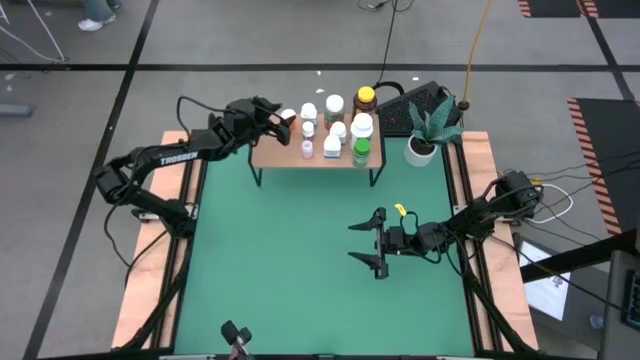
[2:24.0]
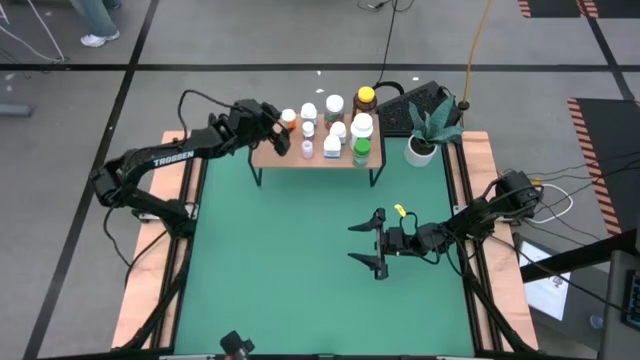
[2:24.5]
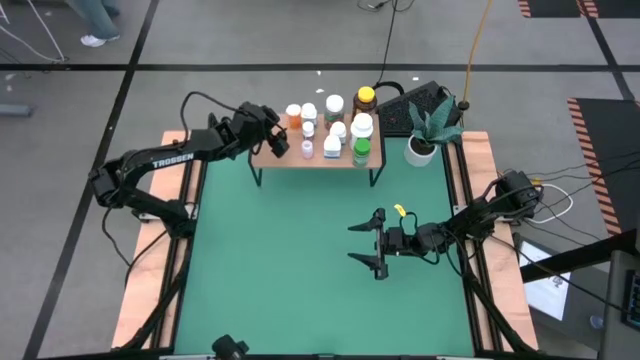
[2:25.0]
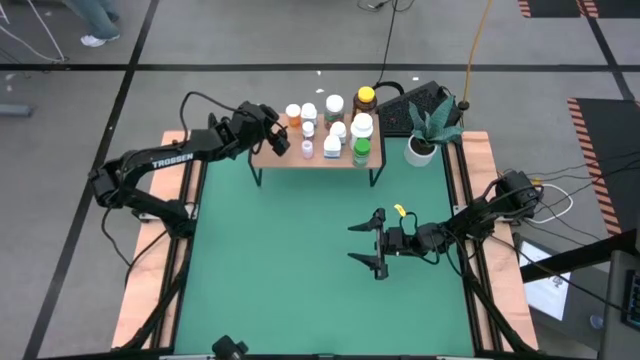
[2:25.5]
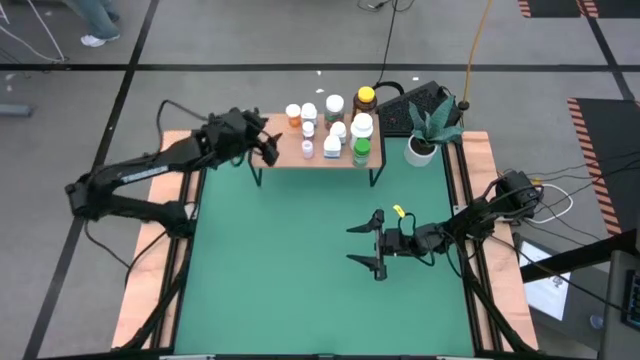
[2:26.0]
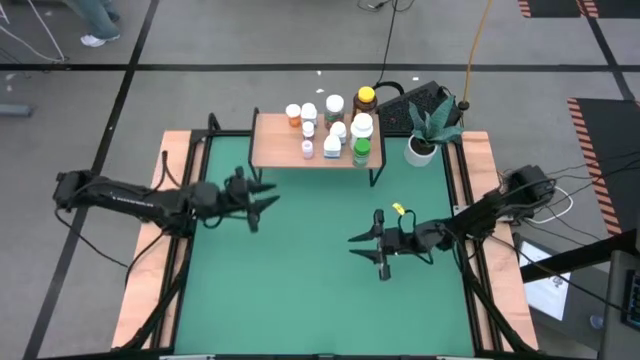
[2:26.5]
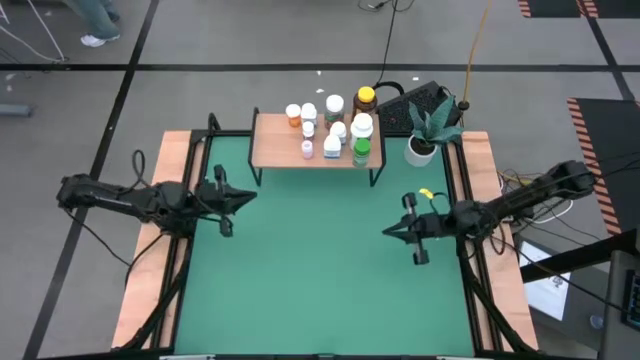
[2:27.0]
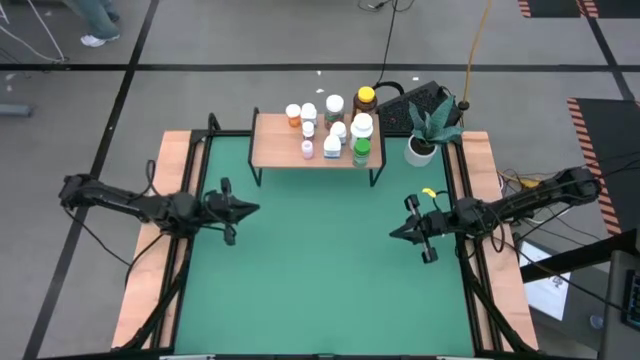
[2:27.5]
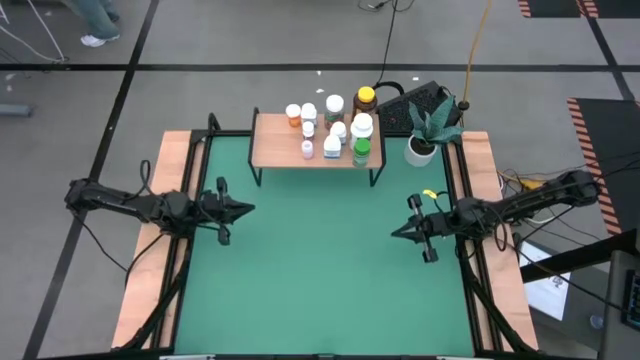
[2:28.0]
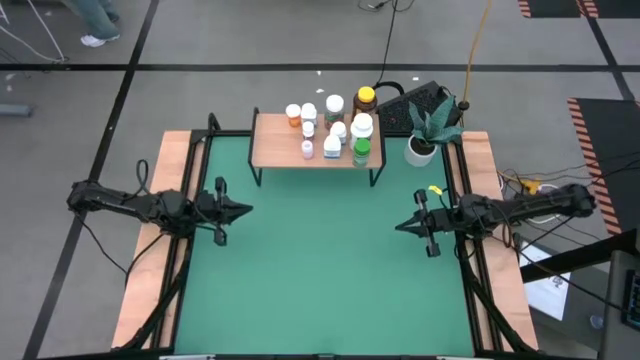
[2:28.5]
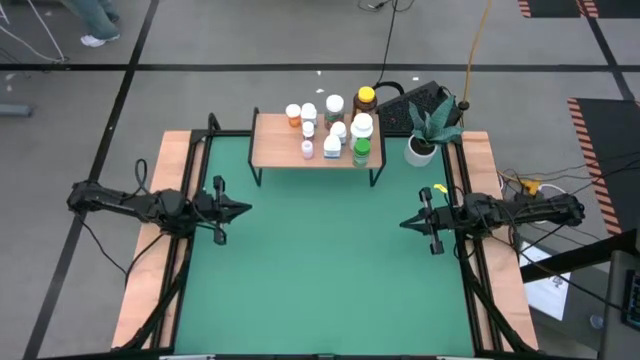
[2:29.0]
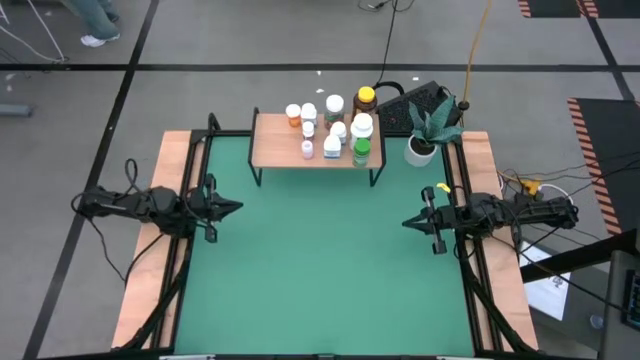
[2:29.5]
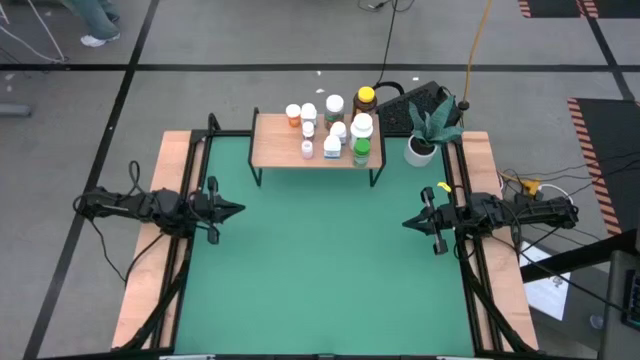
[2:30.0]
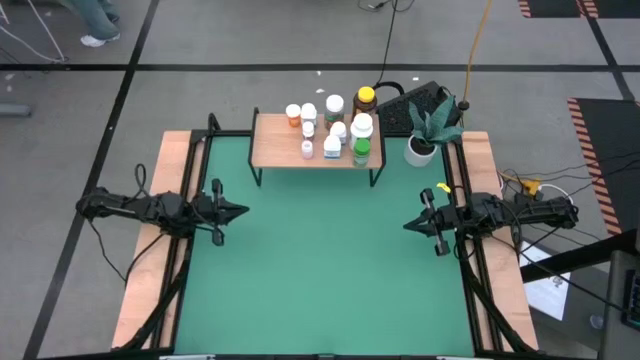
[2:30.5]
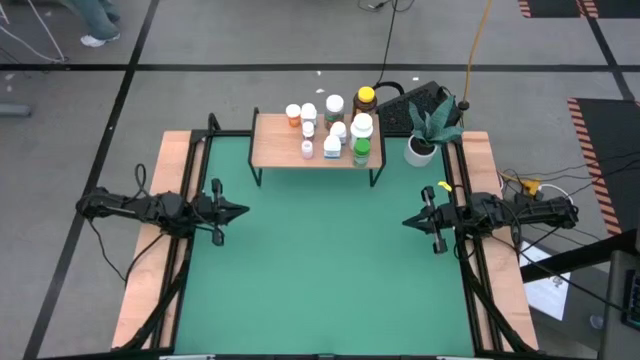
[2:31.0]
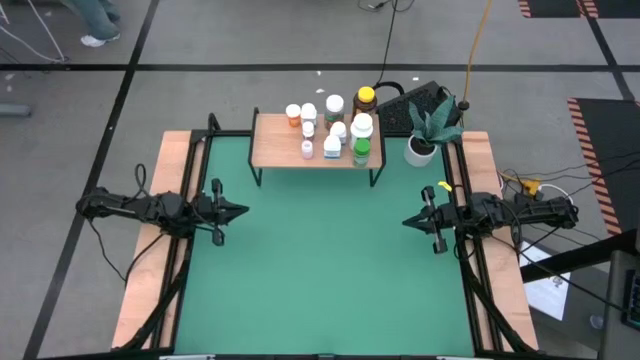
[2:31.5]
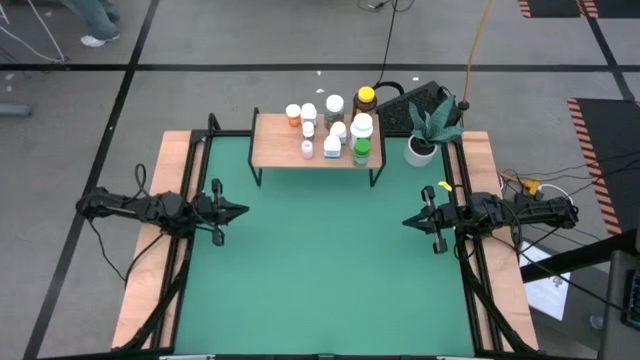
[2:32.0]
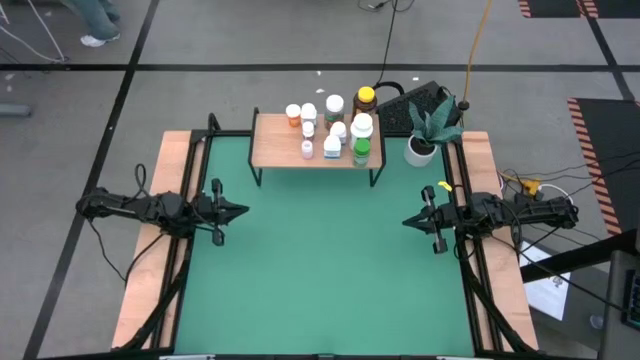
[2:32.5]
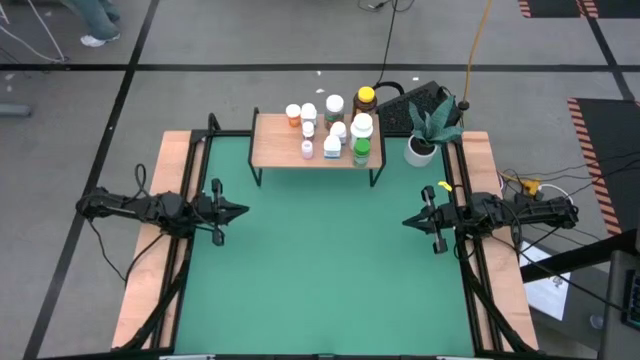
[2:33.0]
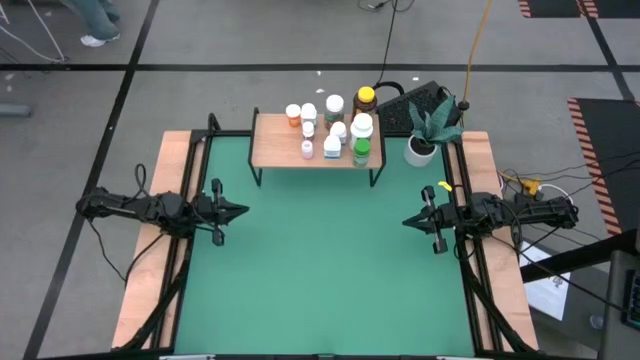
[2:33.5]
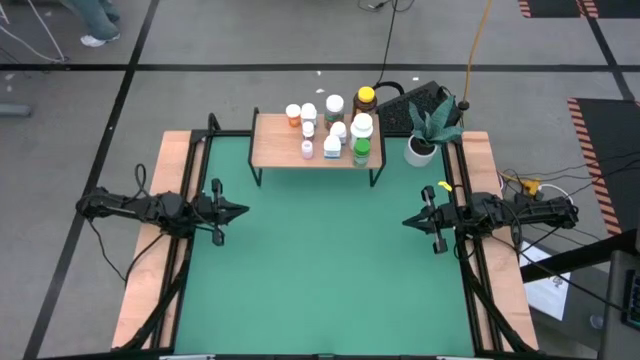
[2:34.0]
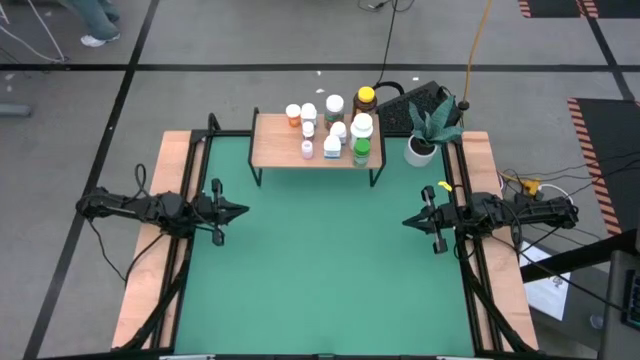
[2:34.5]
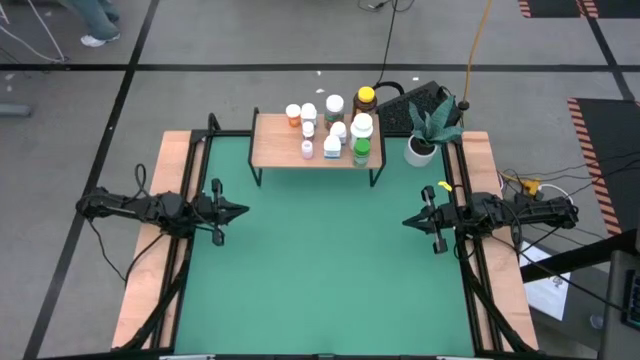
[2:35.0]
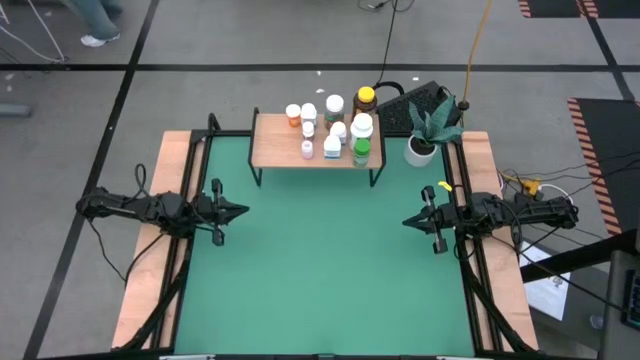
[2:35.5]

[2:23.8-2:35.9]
Task: Pick and place medicine bottles onto shelf by color
Return to Home Position

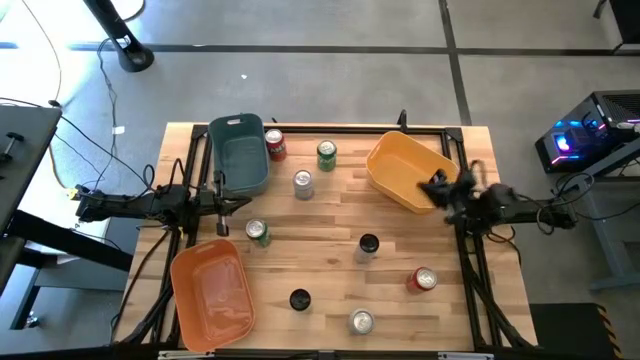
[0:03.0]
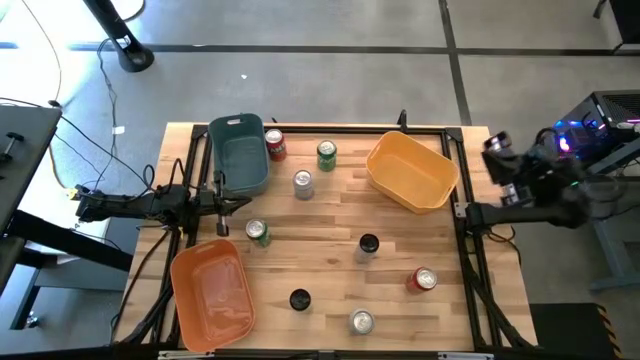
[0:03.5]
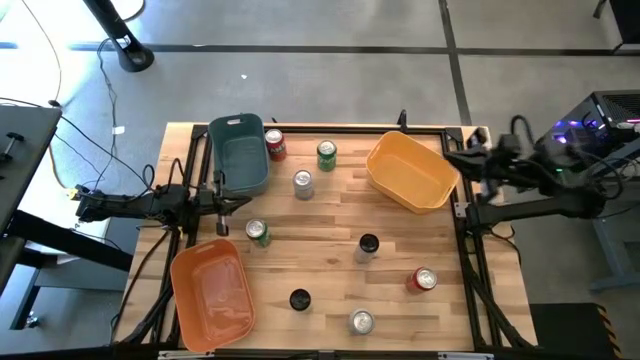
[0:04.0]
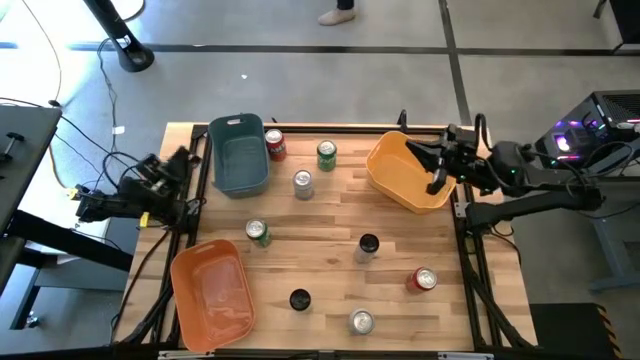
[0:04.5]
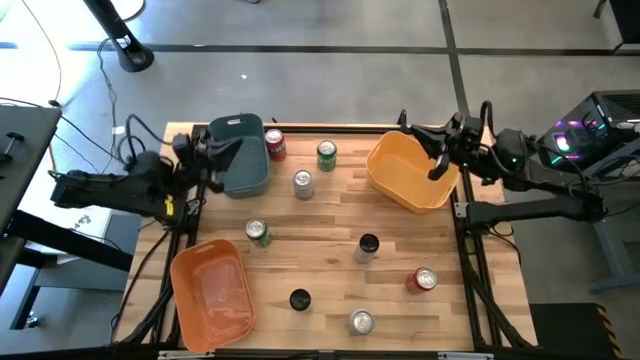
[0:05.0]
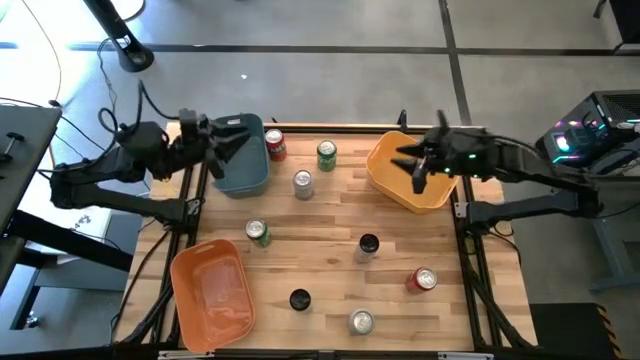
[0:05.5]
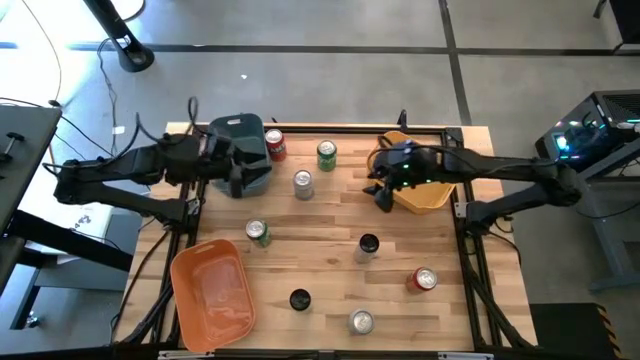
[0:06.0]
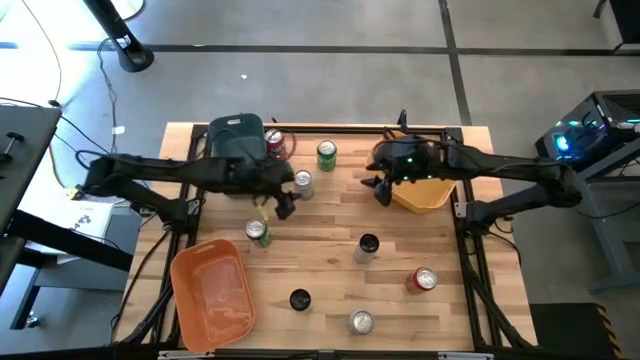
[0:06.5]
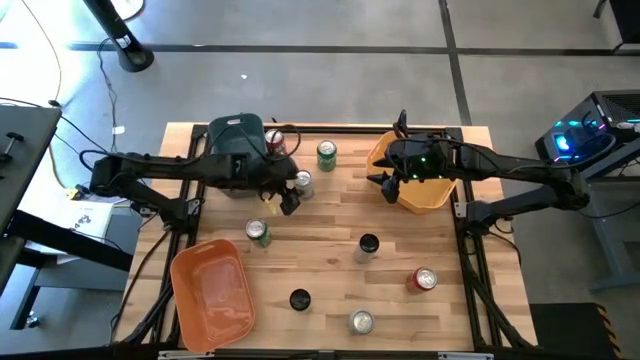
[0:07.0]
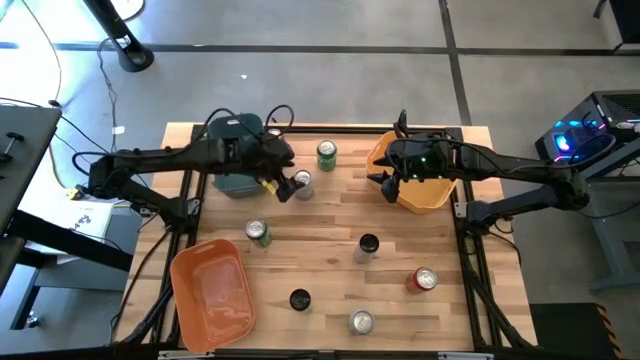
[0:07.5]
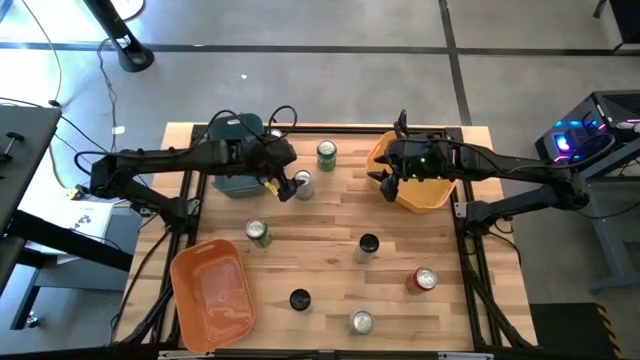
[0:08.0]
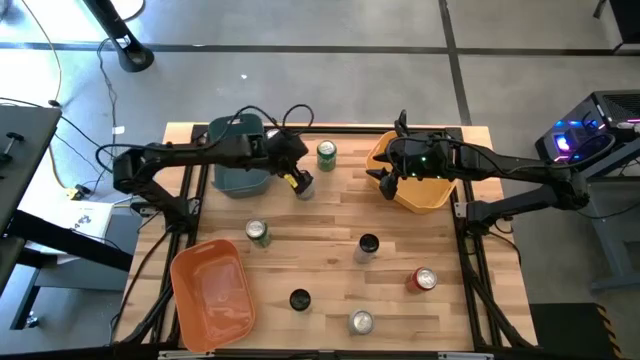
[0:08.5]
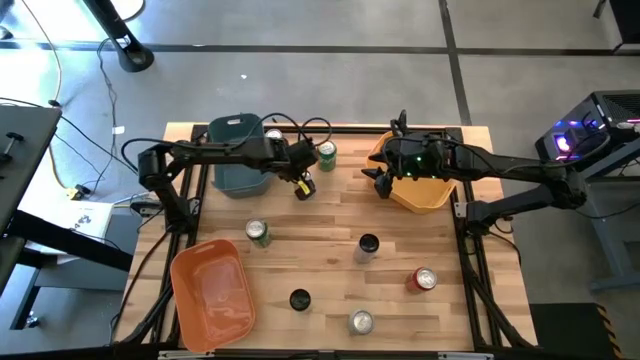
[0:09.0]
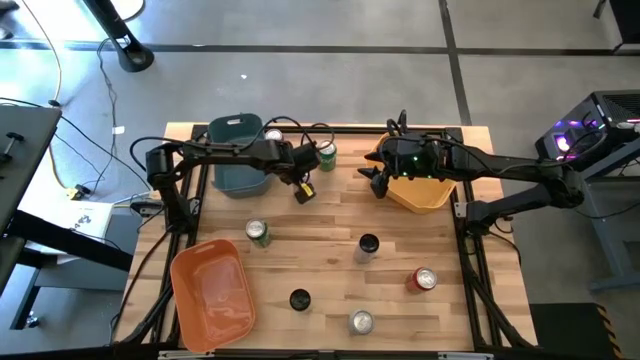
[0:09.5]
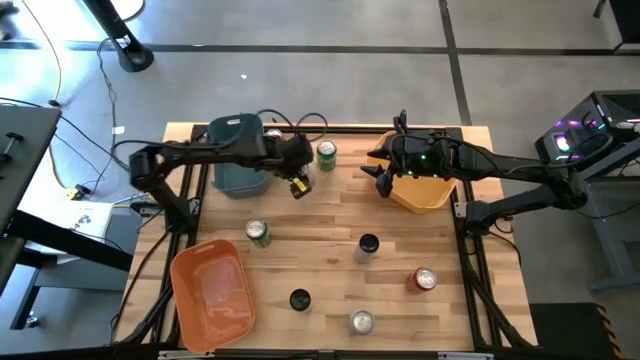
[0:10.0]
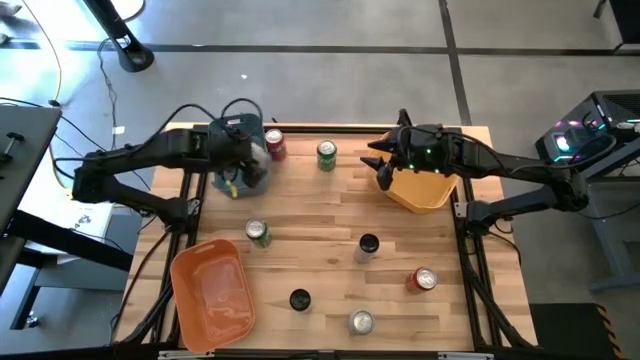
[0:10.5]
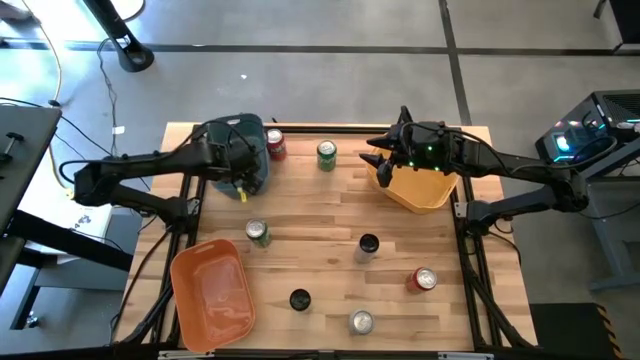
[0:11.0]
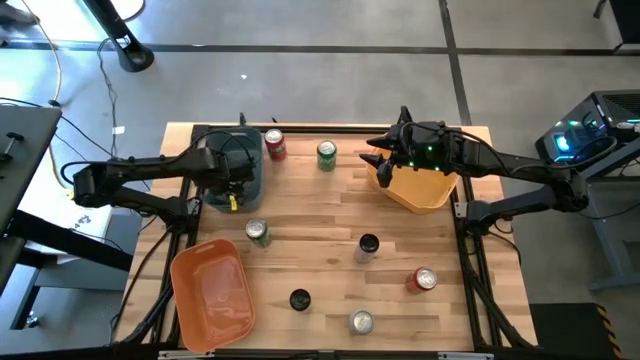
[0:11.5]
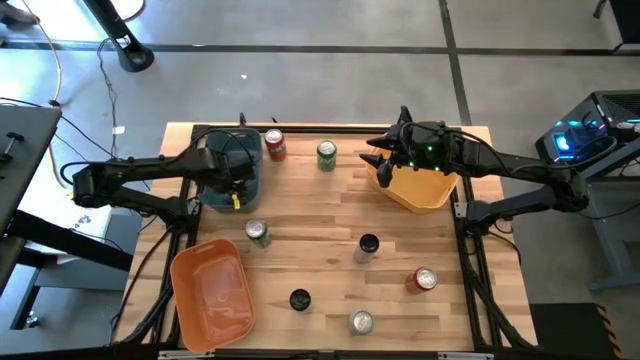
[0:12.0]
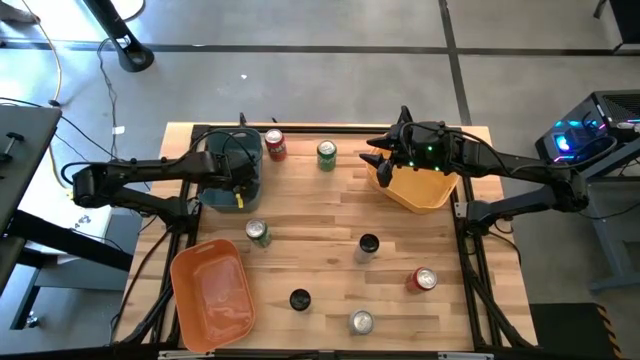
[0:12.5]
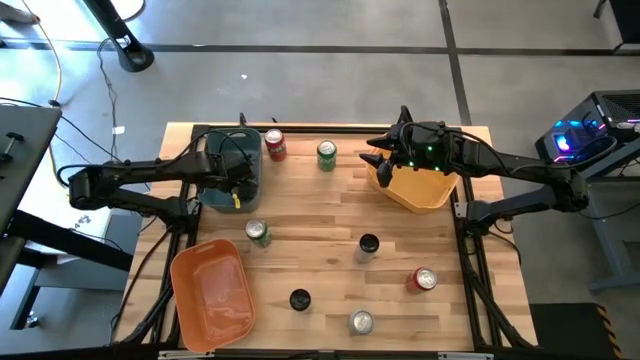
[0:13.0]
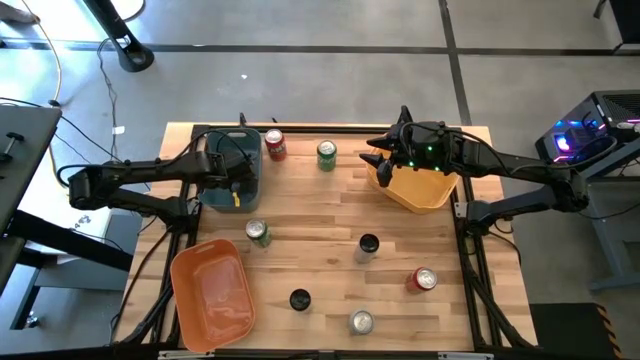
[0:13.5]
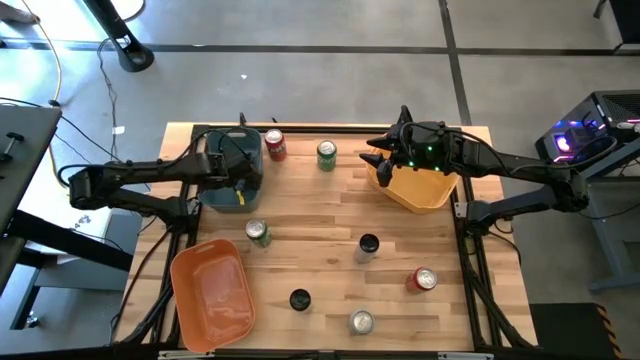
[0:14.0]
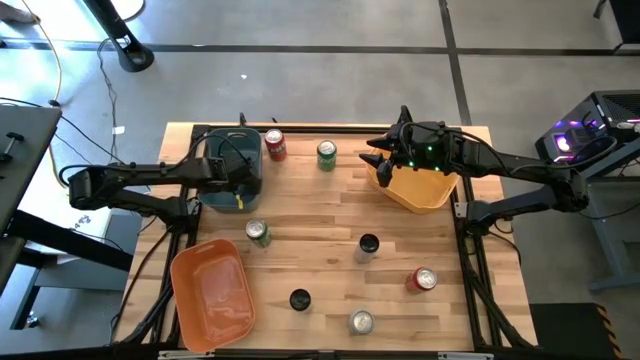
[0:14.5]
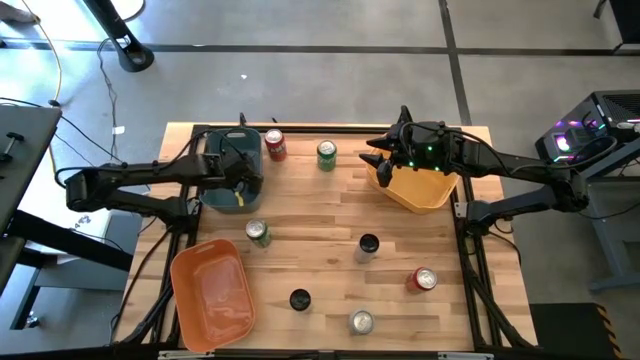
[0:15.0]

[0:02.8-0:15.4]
Task: Sort soda cans
Put the top white soda can into the green bin
